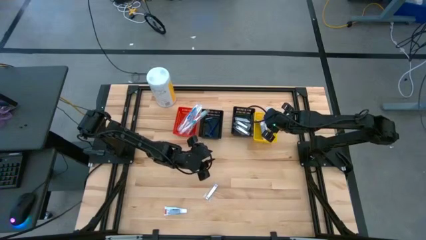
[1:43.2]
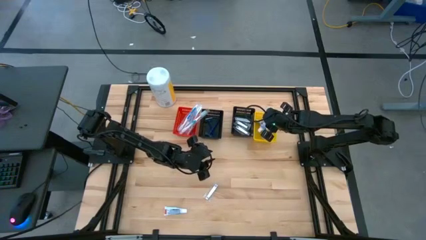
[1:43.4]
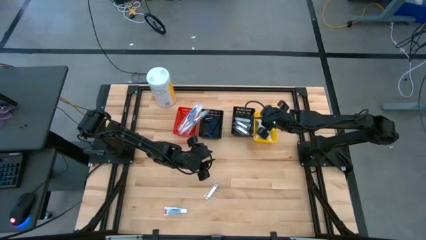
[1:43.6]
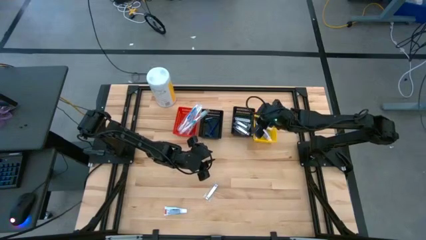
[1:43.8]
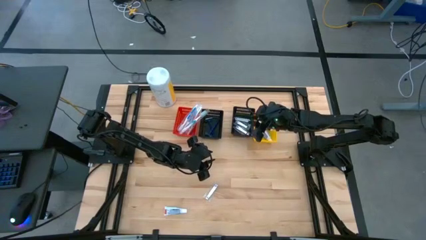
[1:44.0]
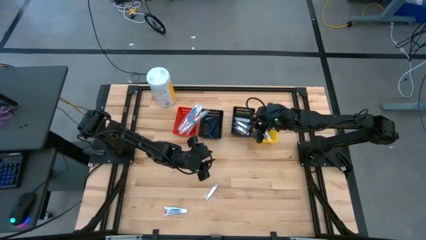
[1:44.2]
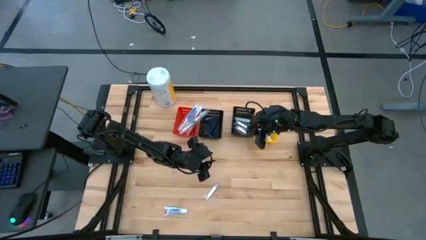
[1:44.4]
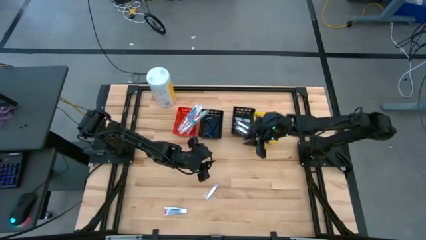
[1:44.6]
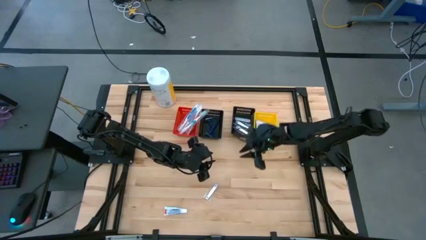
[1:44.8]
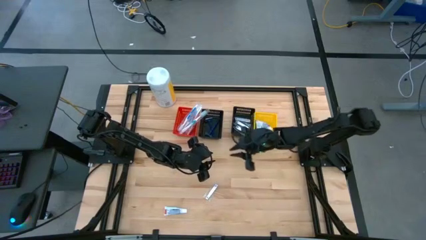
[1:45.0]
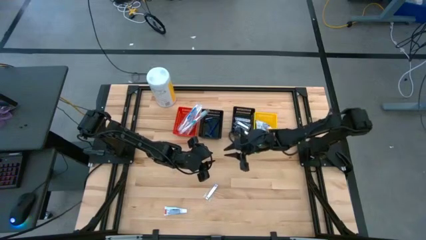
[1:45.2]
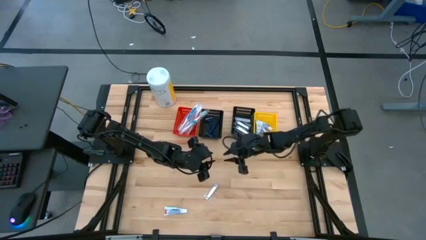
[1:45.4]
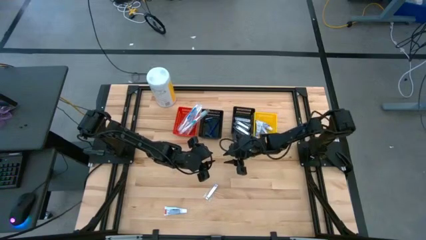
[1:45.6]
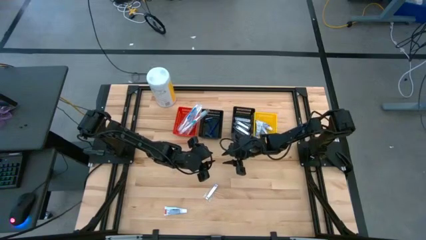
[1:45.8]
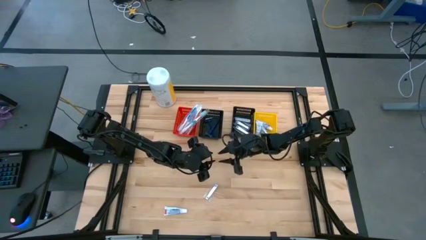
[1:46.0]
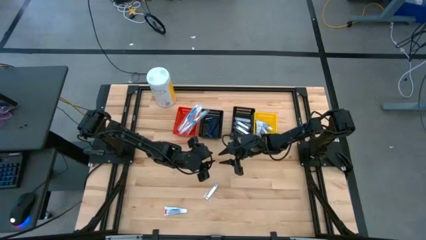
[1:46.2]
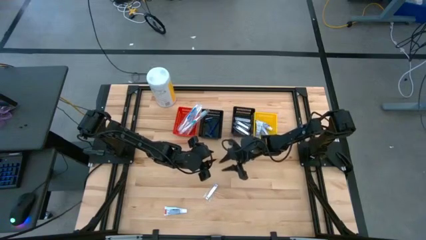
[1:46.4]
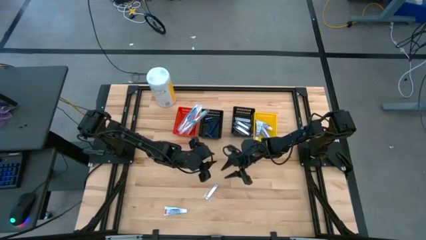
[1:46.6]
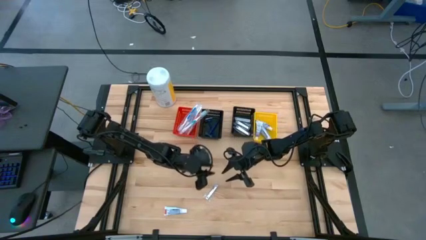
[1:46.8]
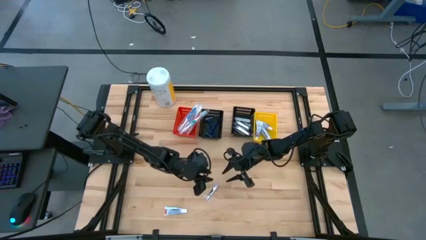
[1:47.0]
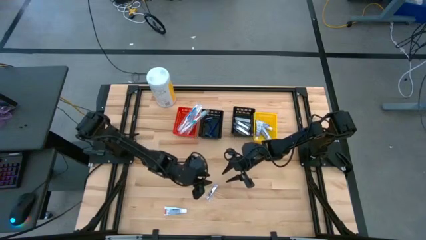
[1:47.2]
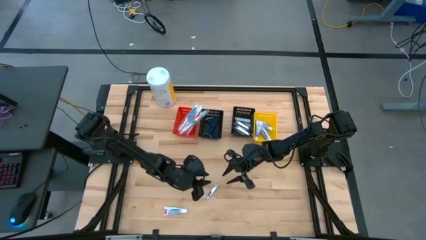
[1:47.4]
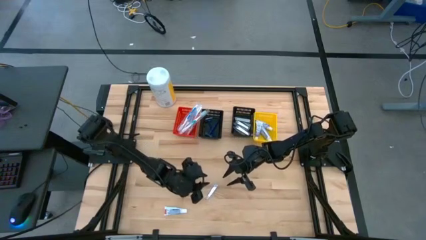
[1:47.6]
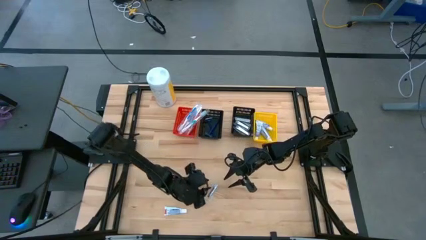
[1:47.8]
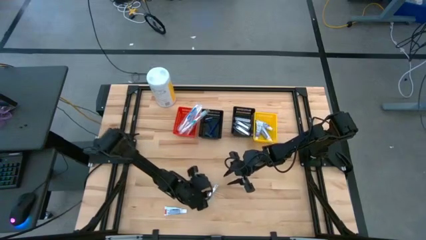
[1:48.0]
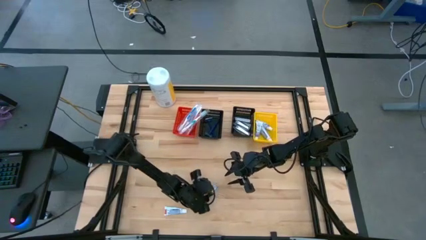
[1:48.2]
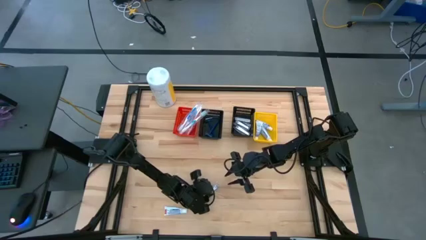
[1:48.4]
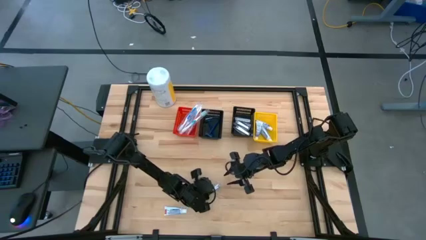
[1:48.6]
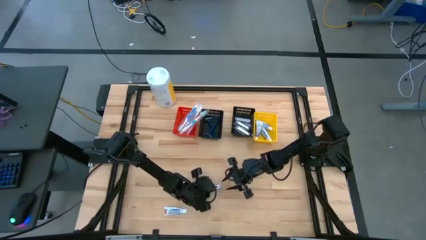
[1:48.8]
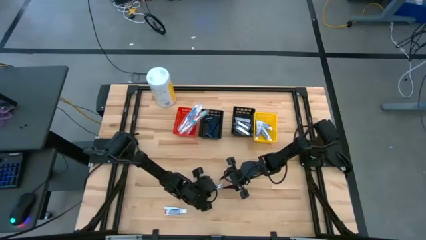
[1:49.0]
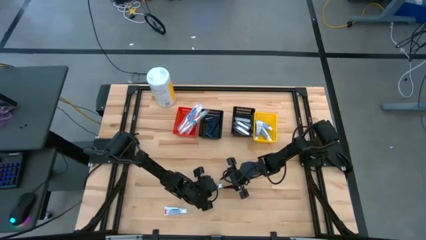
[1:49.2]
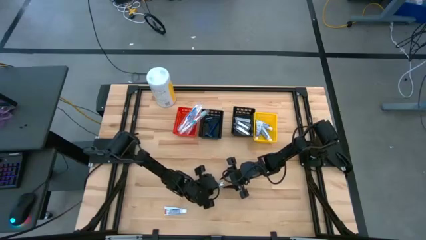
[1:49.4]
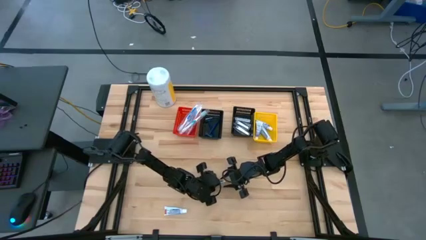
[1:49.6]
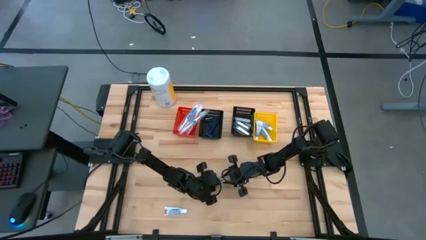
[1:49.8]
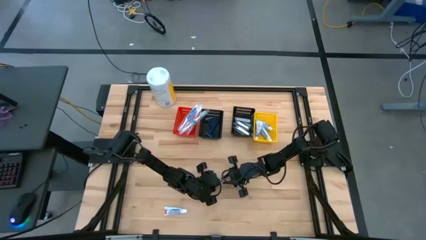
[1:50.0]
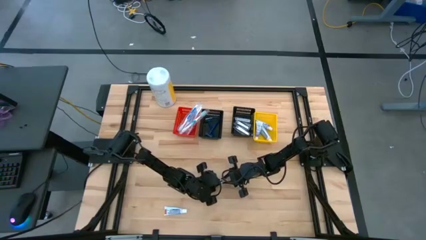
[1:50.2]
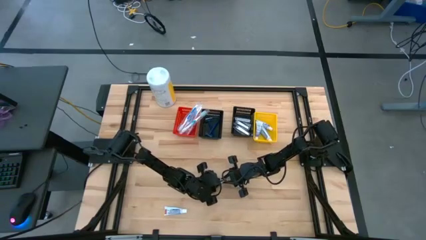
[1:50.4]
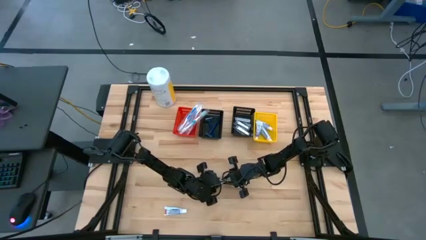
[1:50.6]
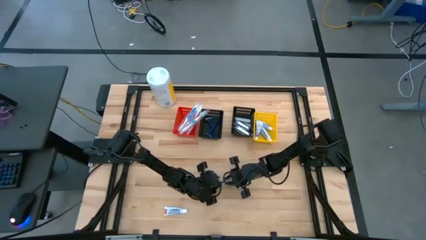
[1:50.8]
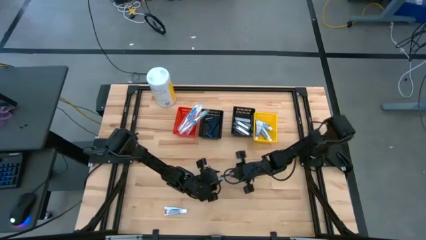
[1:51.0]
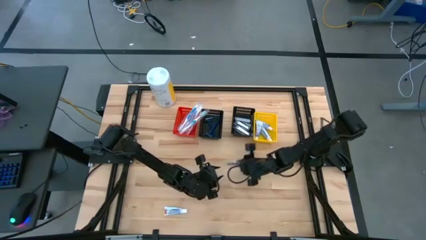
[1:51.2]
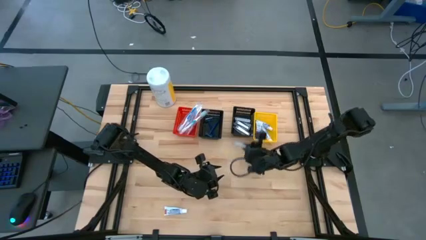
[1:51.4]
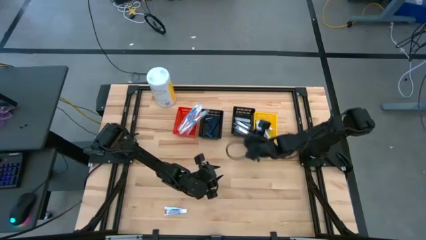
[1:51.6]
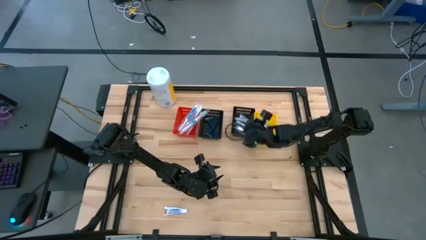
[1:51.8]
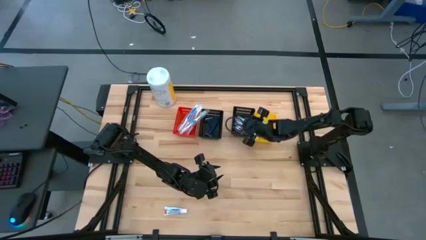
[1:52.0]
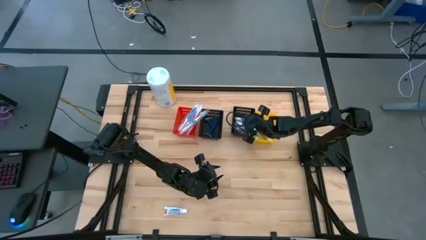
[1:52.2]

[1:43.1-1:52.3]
Task: Pick & Place Travel size toiletries
Put the silver nail cutter into the right black basket

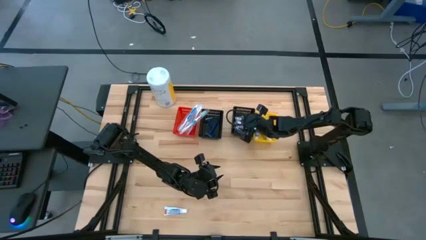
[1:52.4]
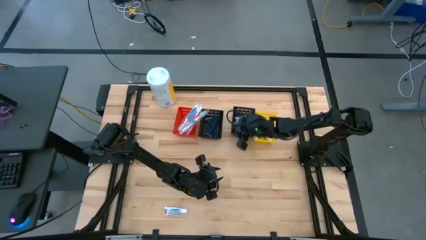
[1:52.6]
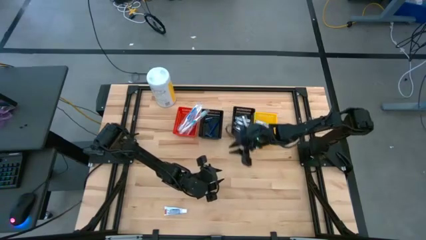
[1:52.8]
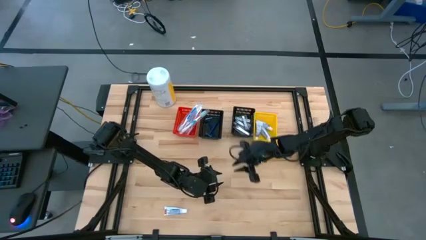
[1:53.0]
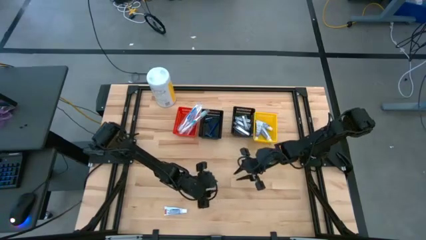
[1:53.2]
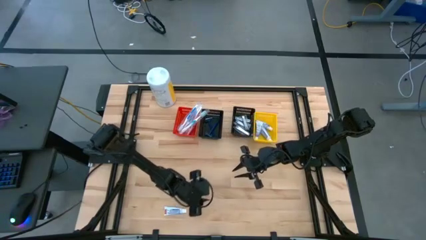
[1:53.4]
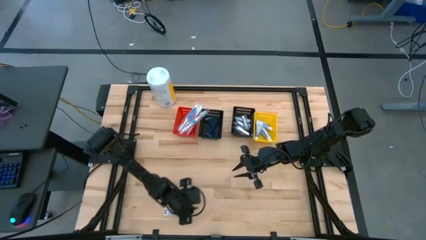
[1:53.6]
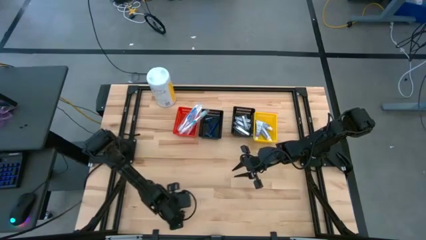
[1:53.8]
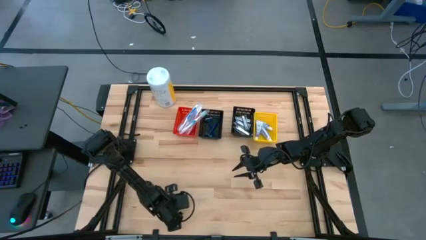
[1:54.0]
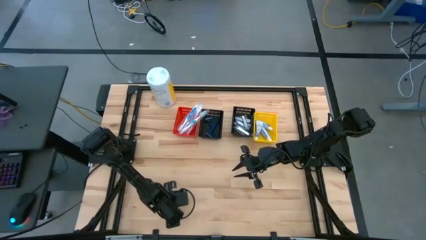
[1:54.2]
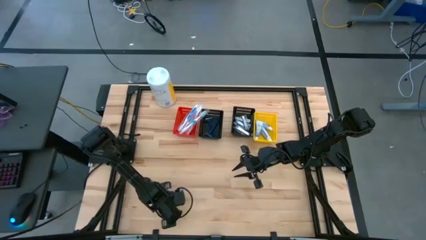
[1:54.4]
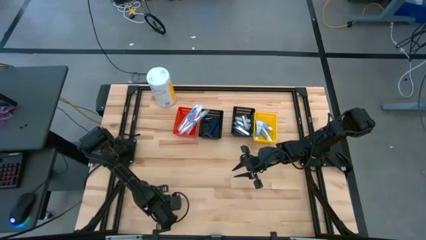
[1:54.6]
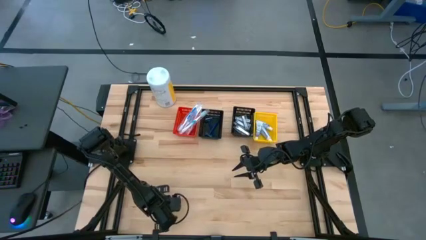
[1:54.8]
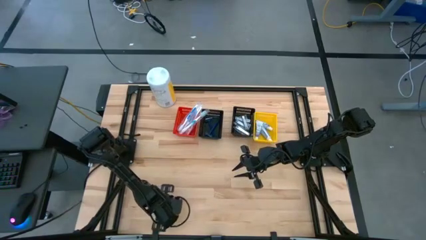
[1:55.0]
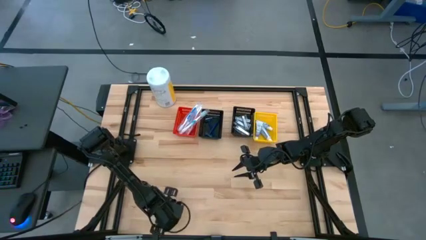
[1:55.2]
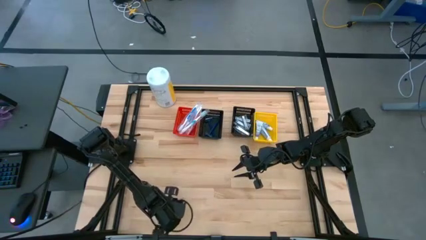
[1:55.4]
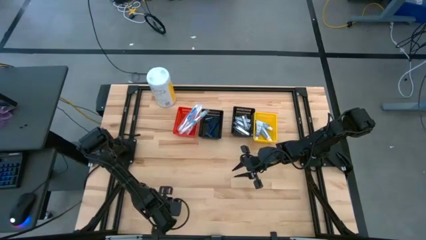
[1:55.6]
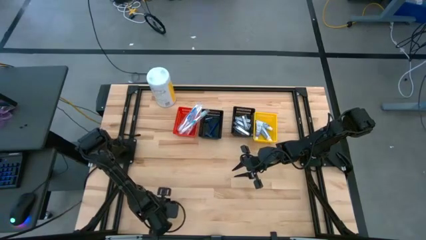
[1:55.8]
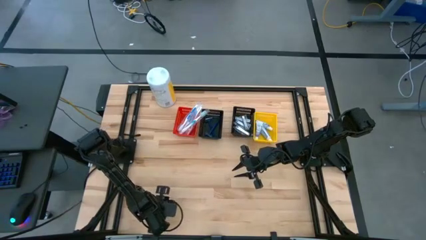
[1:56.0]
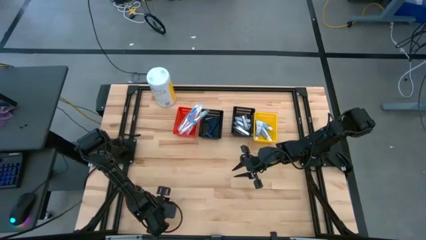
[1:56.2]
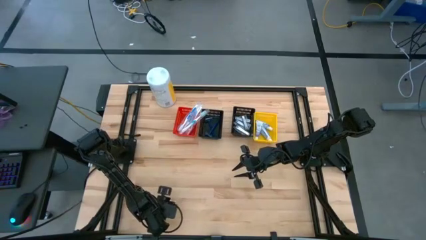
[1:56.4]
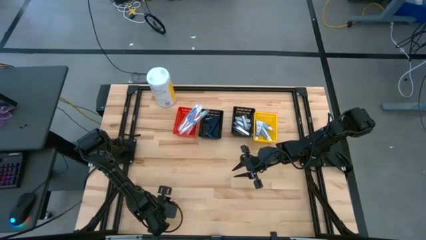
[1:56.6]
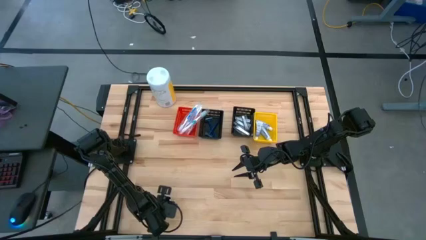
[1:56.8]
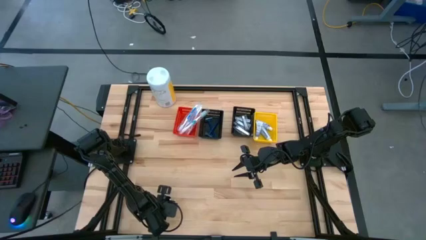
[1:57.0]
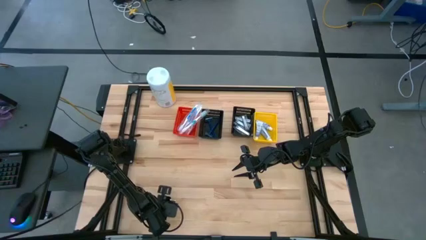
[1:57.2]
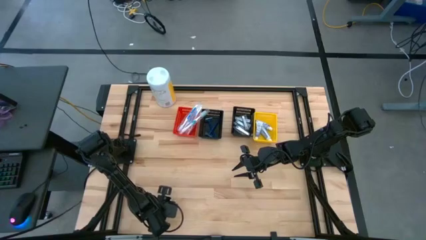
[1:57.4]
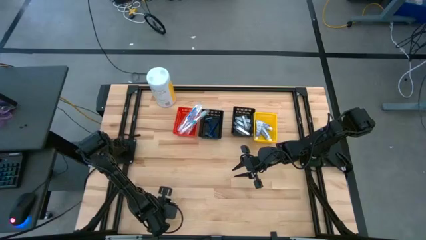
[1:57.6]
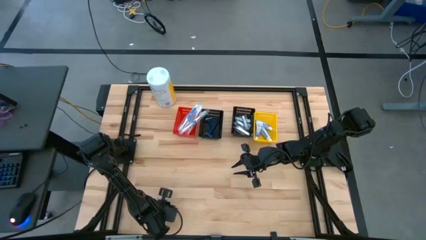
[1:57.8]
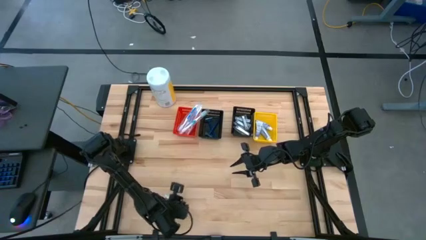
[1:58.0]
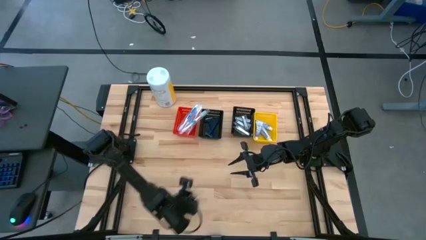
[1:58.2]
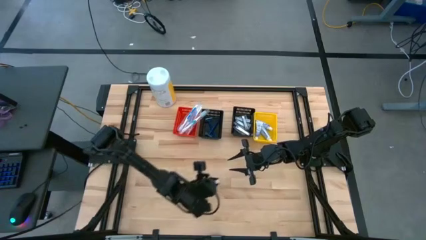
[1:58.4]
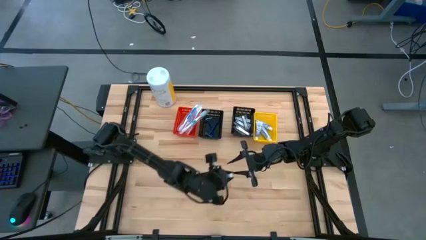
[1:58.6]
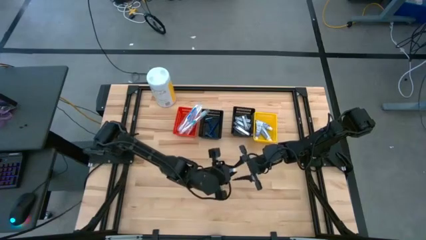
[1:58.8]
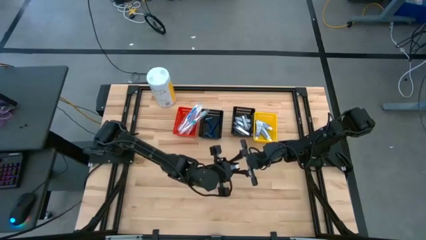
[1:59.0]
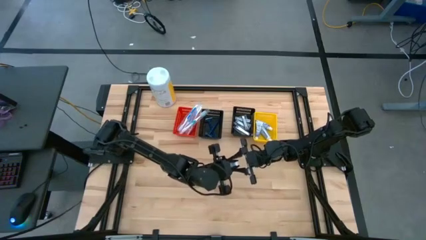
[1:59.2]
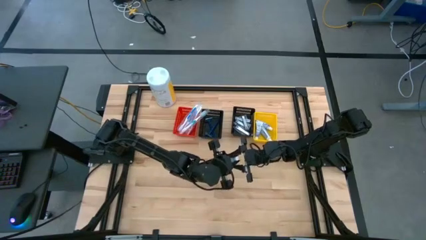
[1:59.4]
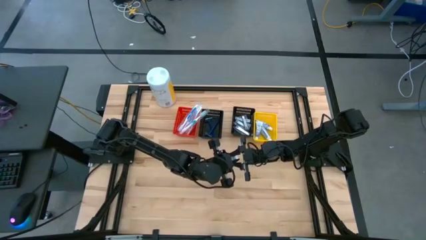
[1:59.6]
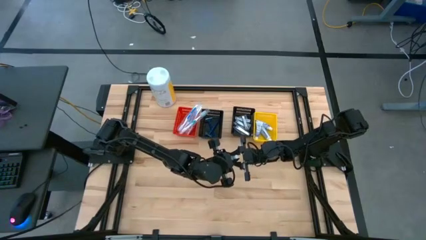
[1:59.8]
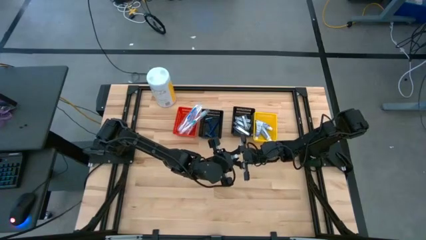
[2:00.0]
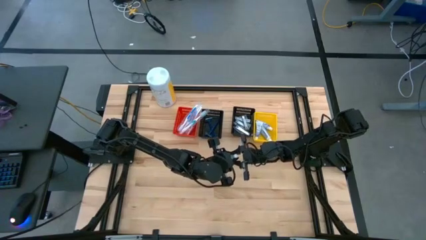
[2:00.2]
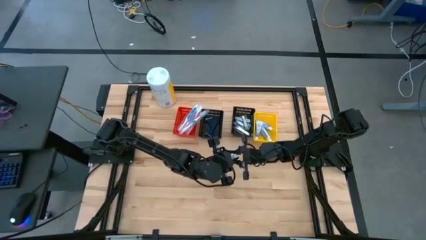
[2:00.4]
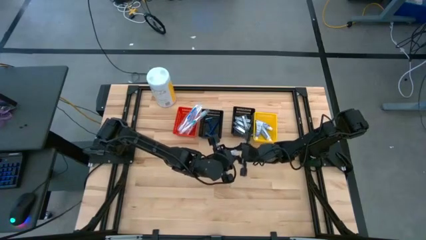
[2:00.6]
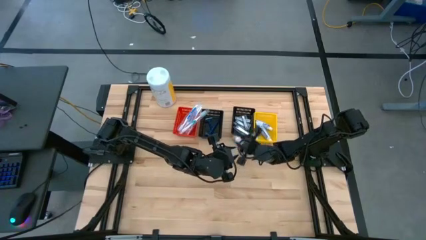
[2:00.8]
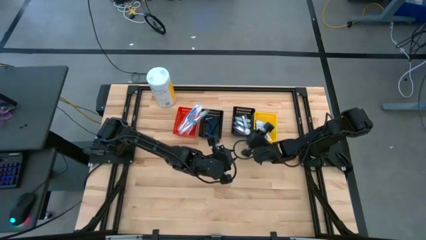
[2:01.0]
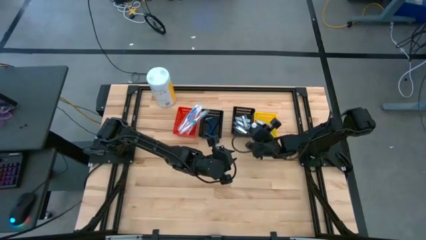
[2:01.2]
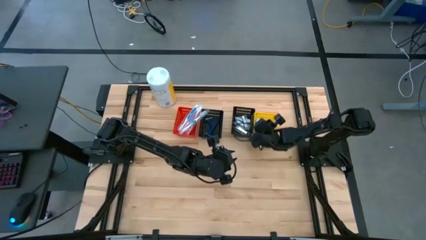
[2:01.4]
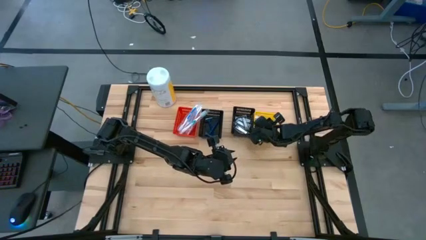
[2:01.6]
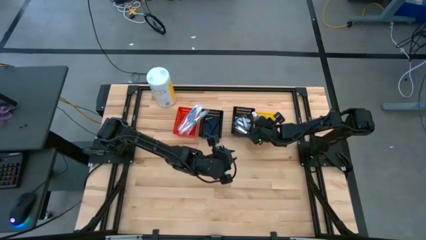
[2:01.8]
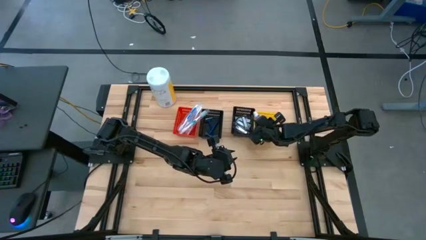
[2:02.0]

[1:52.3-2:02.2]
Put the white toothpaste into the yellow basket
